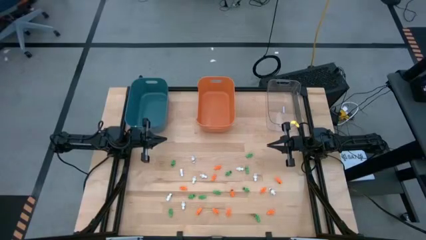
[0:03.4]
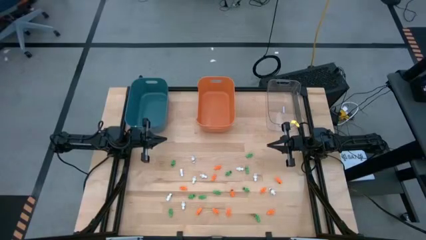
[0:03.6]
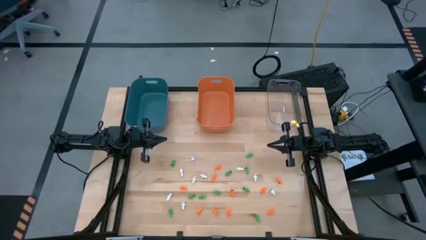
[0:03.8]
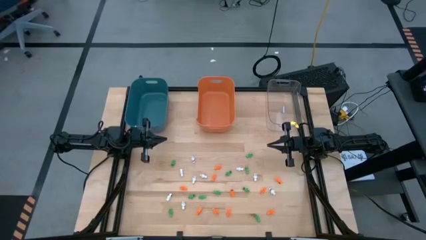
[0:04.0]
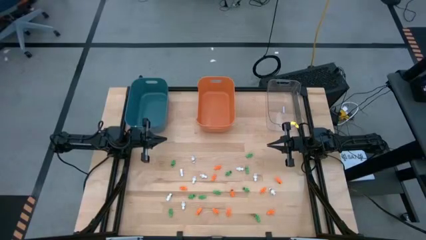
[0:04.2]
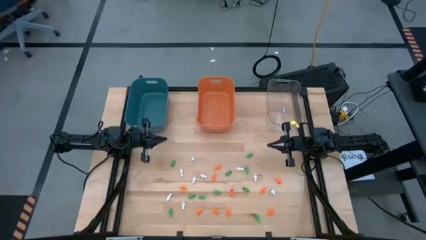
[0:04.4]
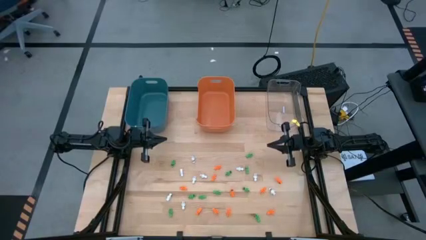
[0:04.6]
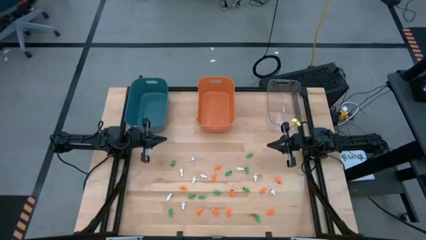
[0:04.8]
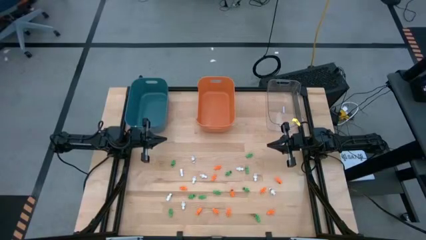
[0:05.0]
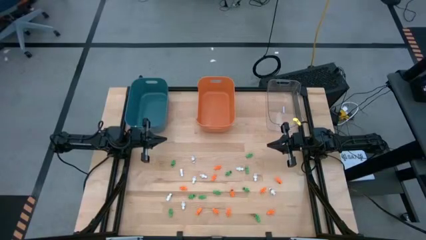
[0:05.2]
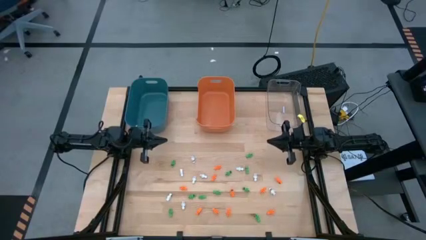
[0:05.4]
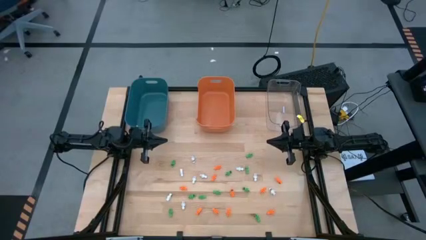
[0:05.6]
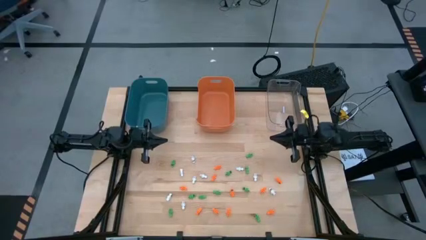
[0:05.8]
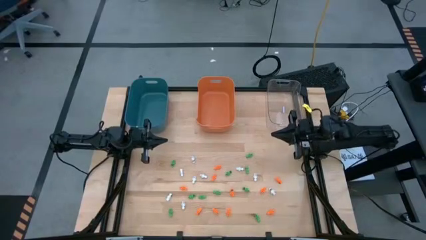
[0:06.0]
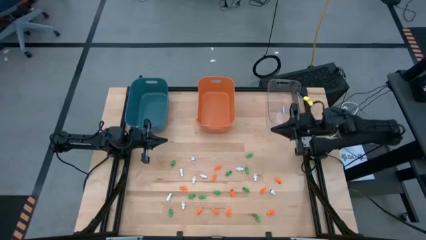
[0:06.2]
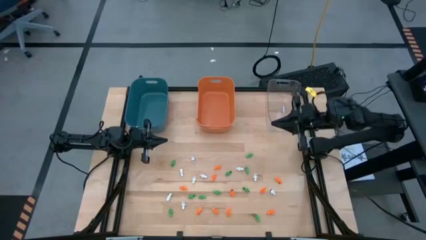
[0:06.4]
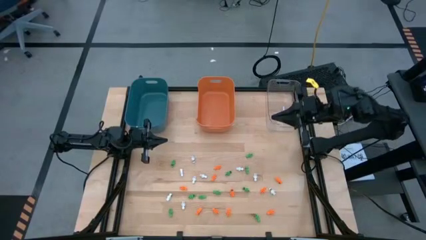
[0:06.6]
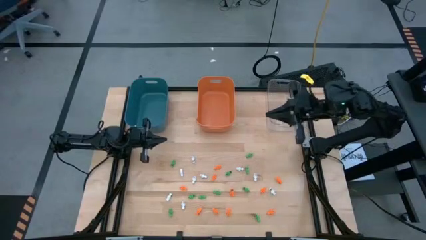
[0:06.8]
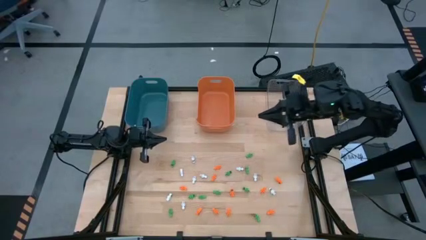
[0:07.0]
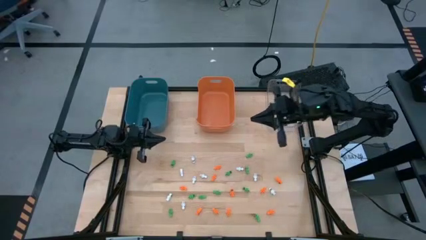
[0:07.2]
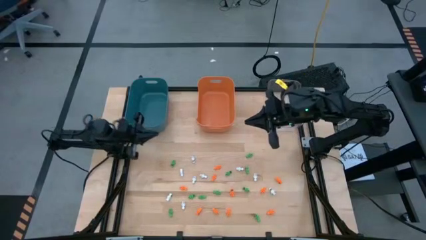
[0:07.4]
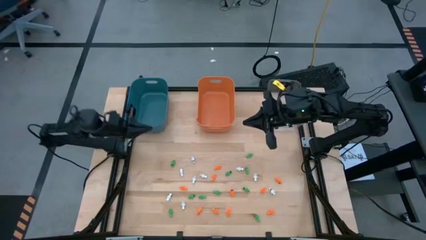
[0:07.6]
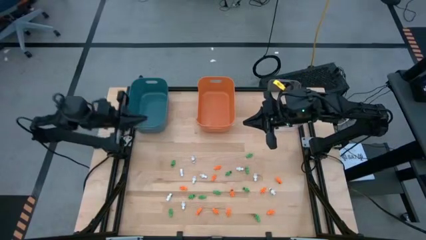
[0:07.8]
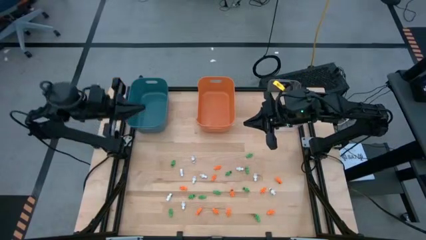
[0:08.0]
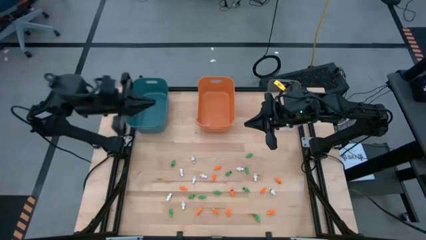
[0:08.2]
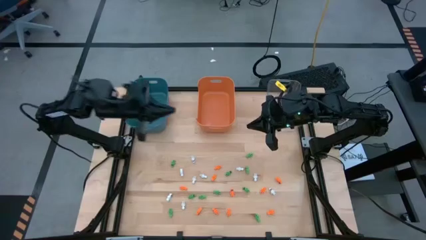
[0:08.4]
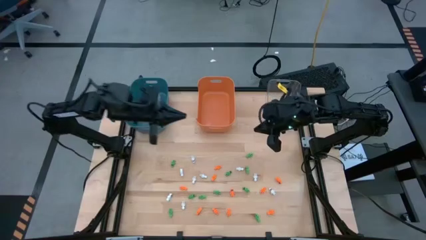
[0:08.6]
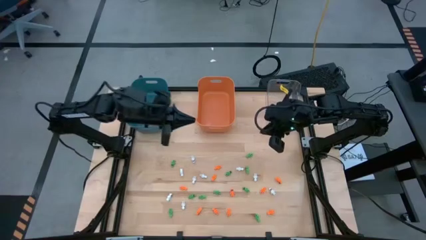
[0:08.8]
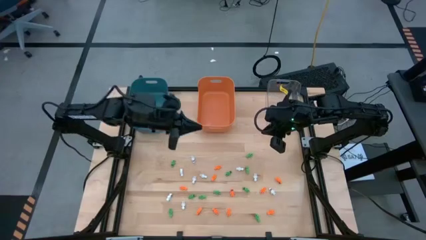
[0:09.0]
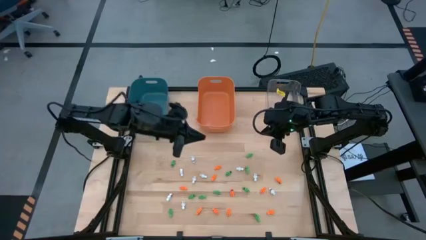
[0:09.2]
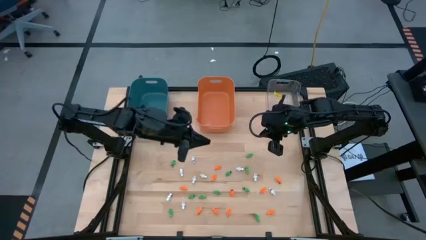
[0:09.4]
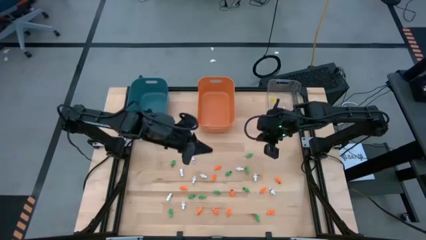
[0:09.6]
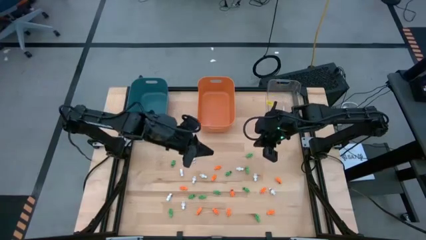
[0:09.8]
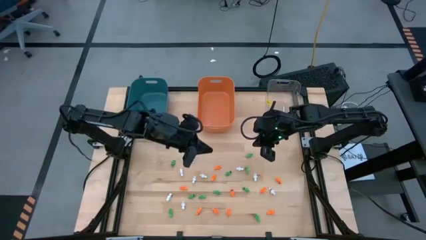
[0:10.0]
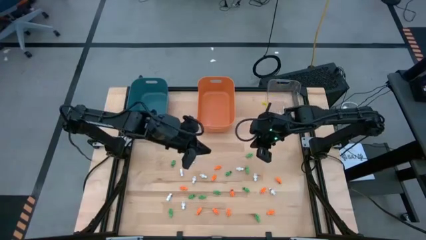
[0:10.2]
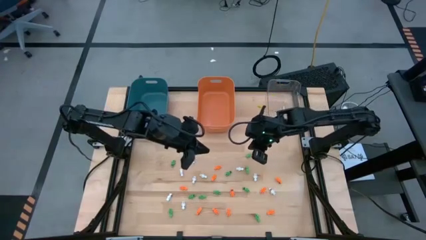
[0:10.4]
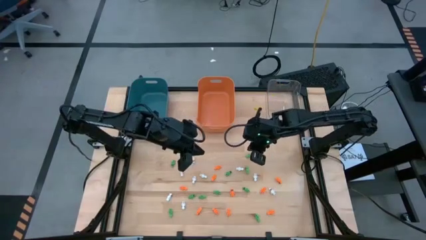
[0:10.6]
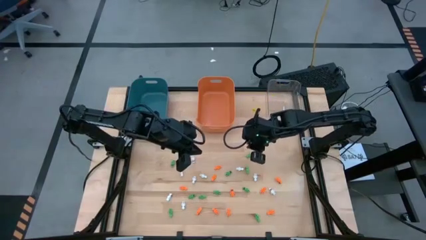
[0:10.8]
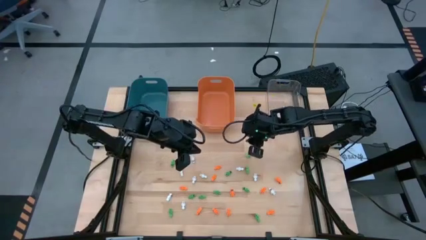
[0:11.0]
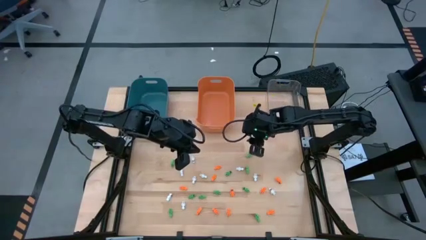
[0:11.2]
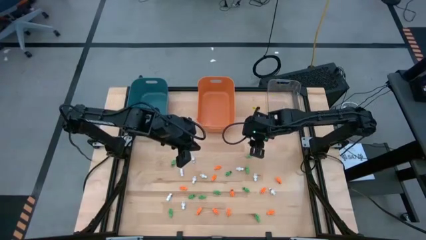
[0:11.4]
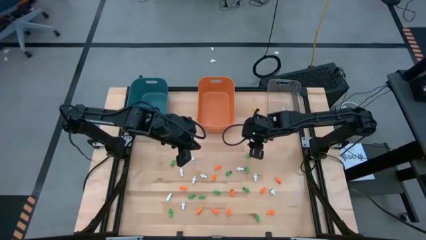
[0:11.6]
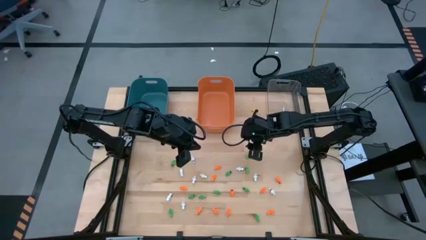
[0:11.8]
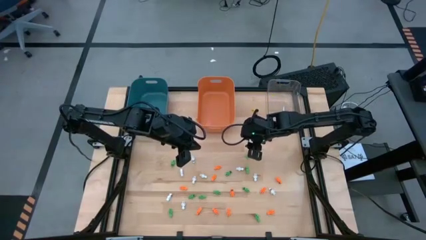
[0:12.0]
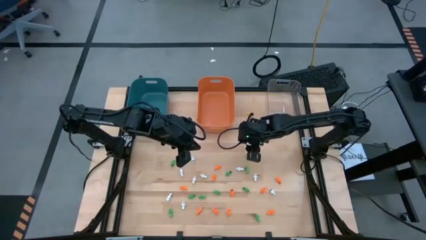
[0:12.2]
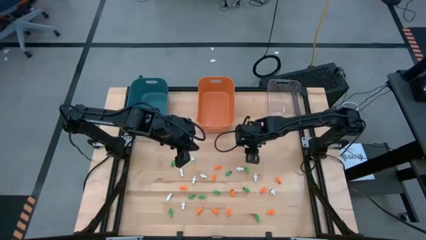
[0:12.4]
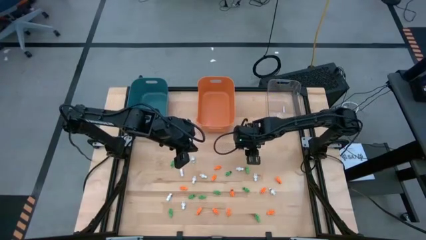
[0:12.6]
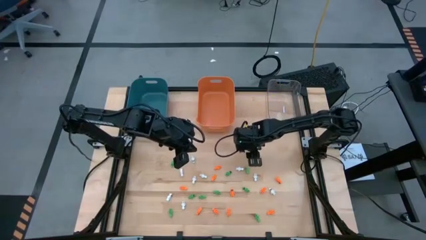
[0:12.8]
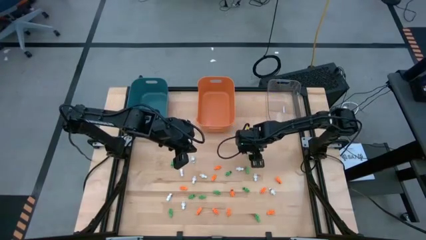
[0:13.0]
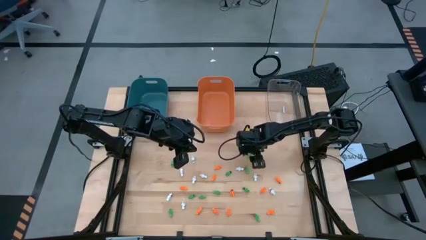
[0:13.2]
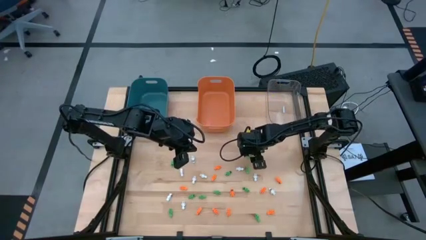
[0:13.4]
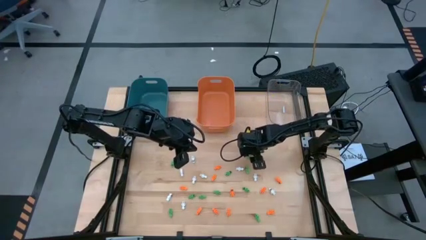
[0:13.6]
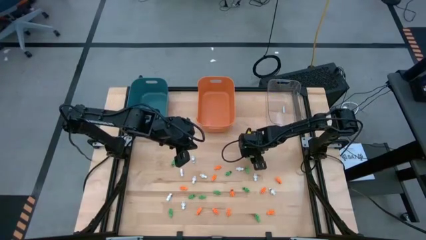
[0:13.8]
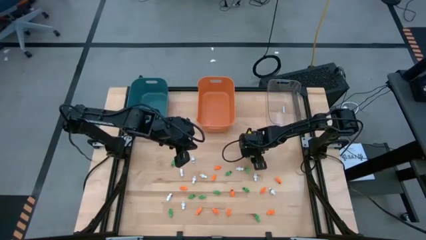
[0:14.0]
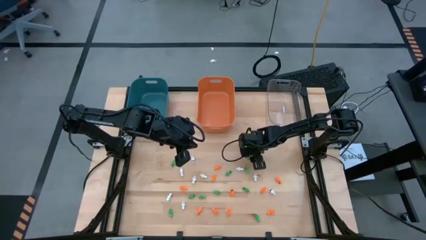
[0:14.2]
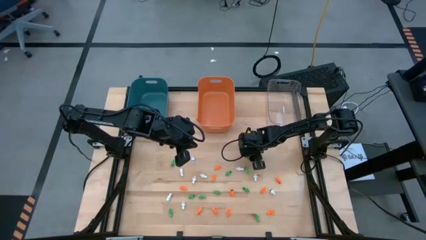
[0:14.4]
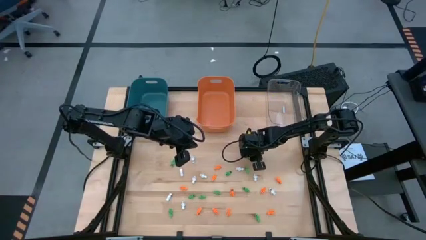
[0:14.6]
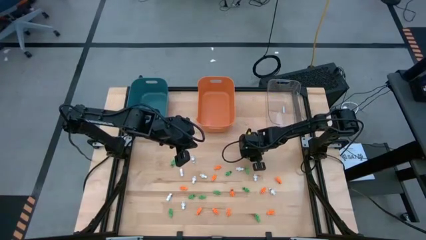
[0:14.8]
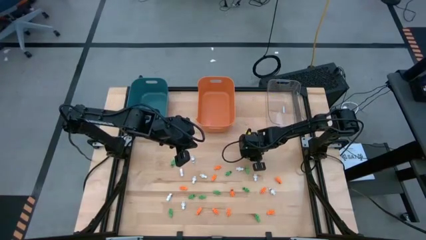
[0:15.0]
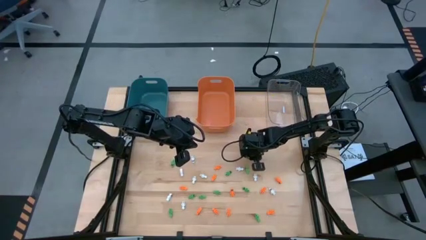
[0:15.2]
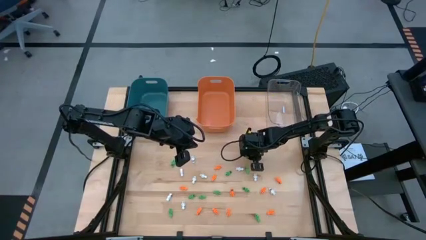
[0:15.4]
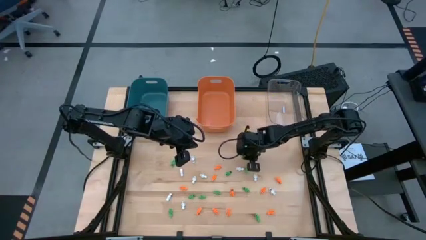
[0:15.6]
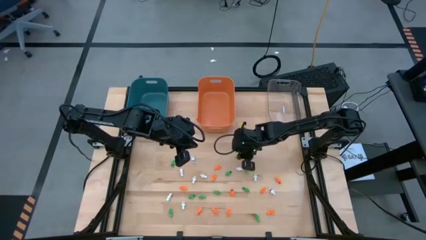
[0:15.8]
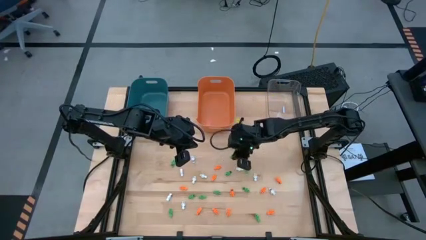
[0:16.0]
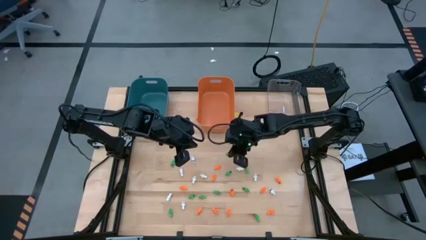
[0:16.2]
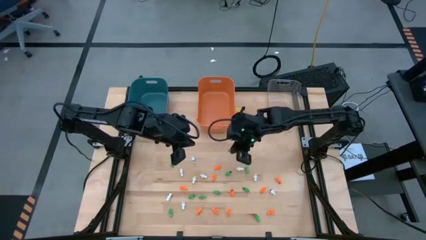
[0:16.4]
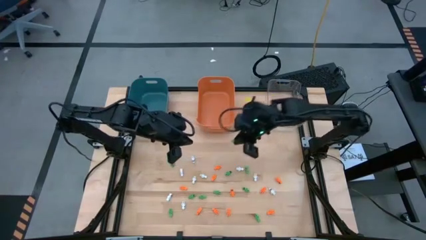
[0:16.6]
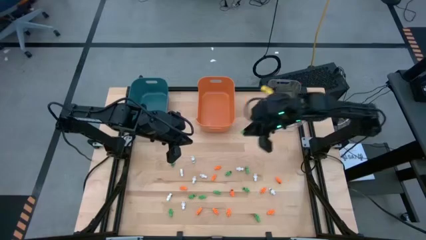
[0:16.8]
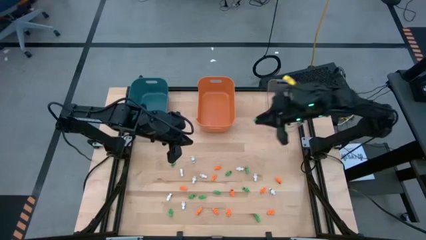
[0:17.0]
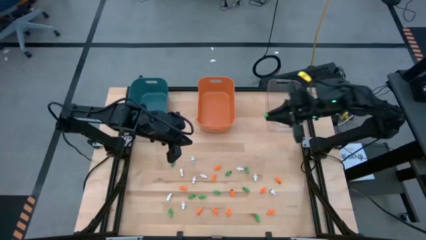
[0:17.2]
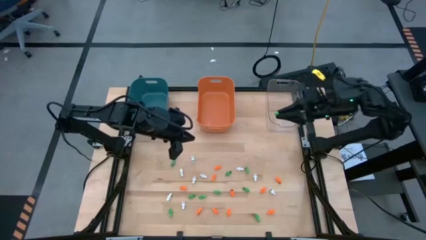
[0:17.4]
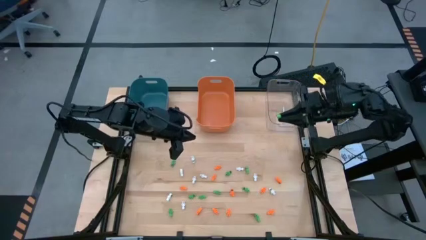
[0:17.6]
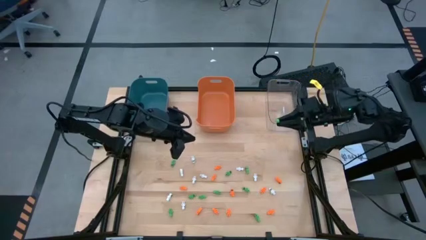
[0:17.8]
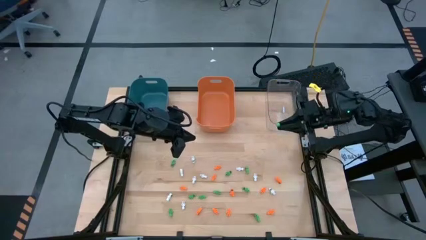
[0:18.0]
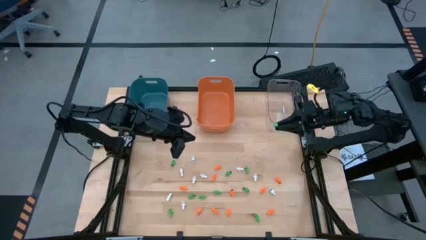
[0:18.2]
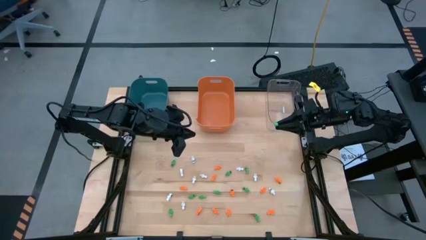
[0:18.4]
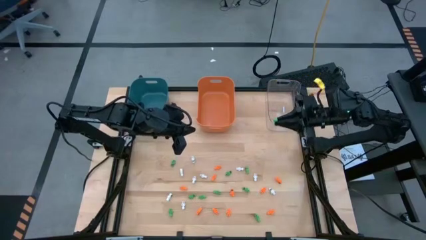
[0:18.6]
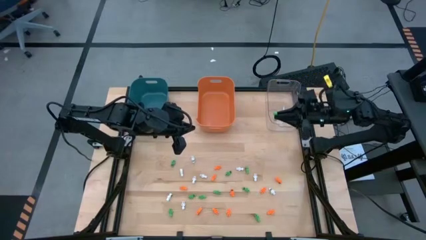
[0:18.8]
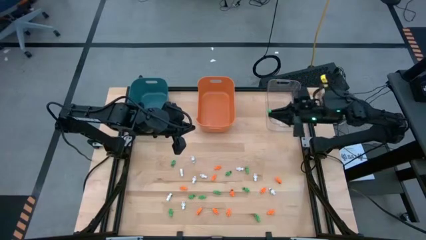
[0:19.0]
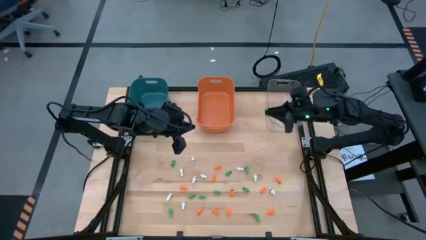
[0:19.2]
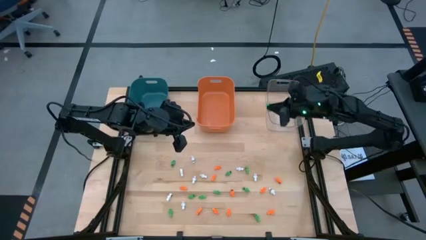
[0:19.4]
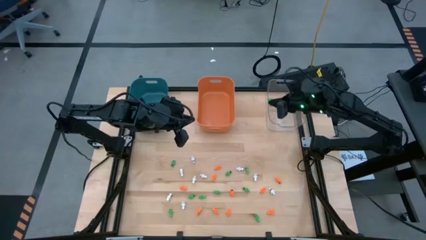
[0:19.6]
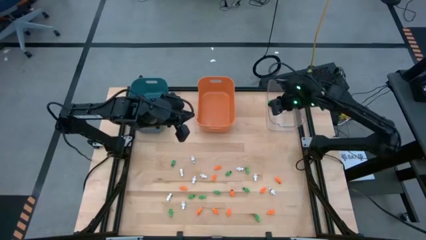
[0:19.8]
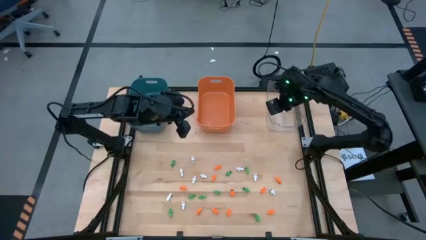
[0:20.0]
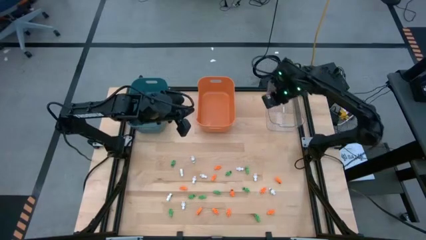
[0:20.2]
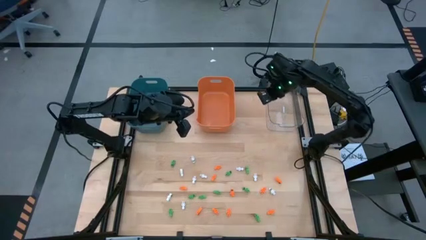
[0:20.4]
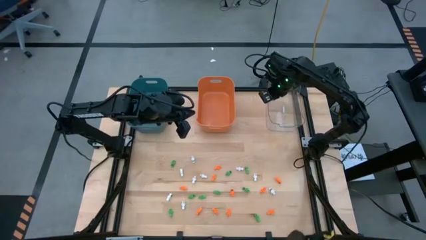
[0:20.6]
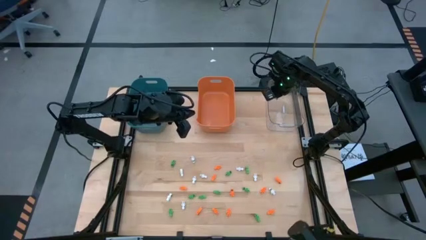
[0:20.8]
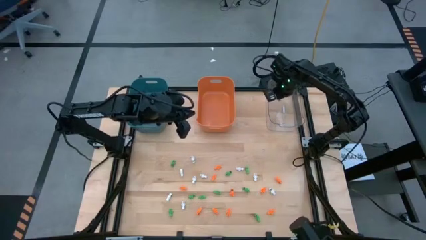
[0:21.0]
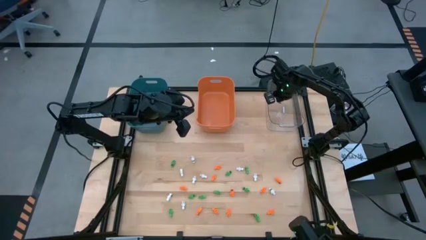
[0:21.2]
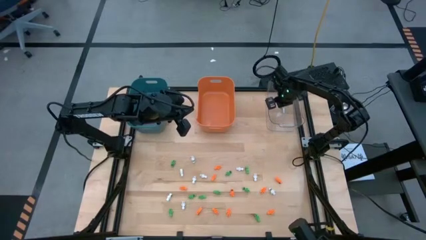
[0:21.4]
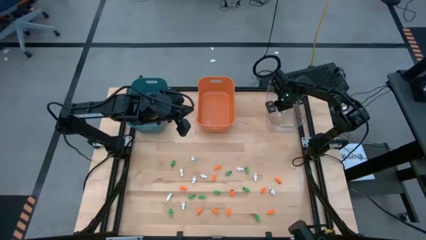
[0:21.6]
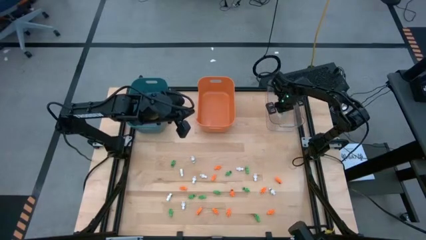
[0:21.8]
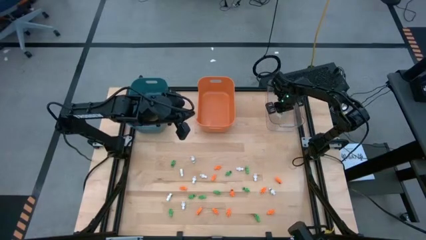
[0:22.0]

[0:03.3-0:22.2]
Task: Sort Halloween decoration
Put the green skeleton toy into the transparent bin
